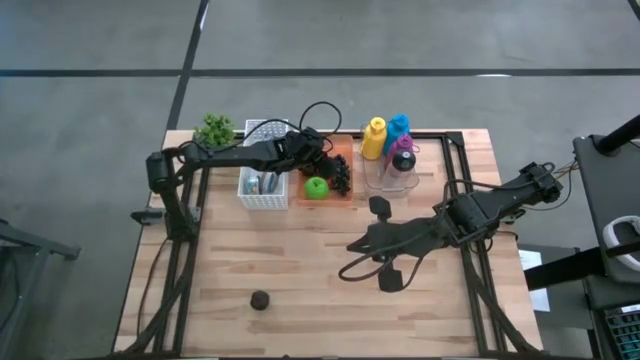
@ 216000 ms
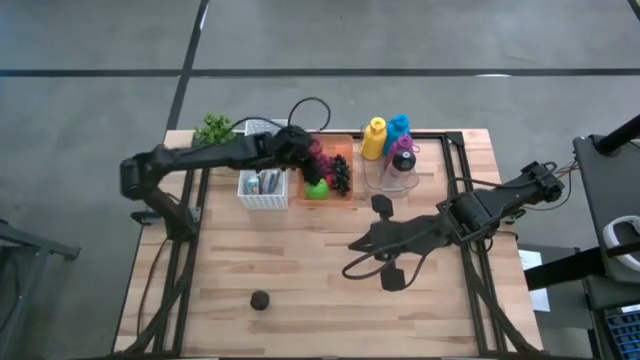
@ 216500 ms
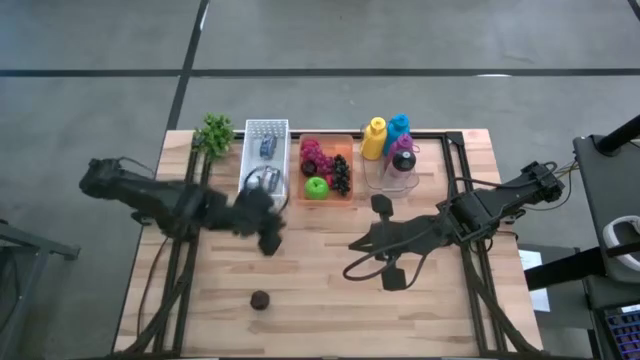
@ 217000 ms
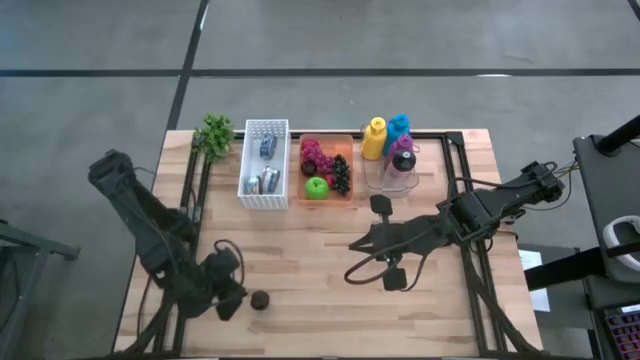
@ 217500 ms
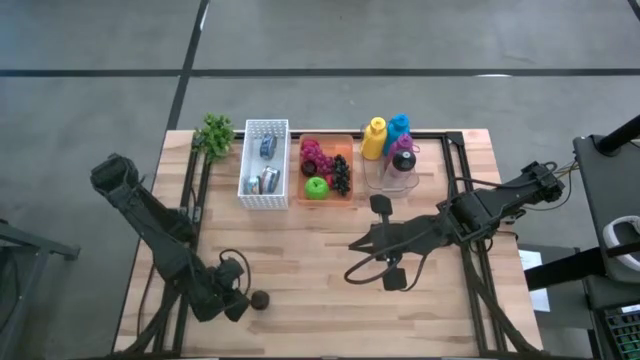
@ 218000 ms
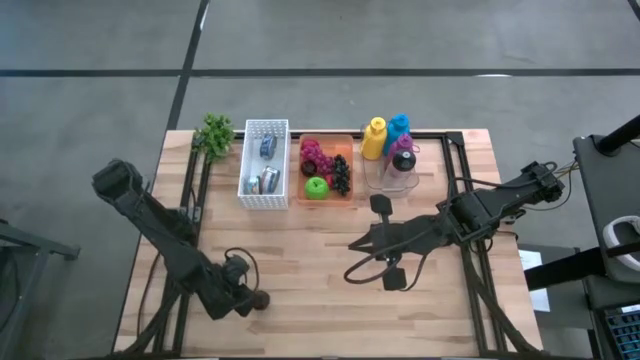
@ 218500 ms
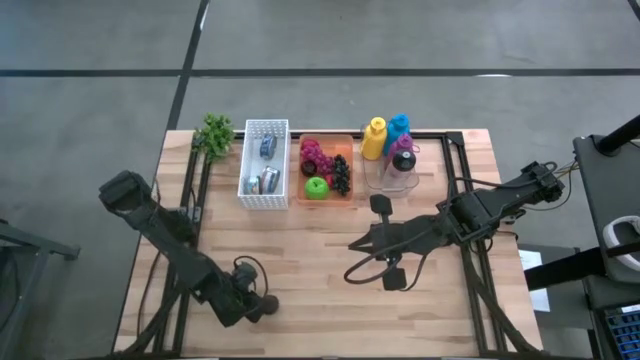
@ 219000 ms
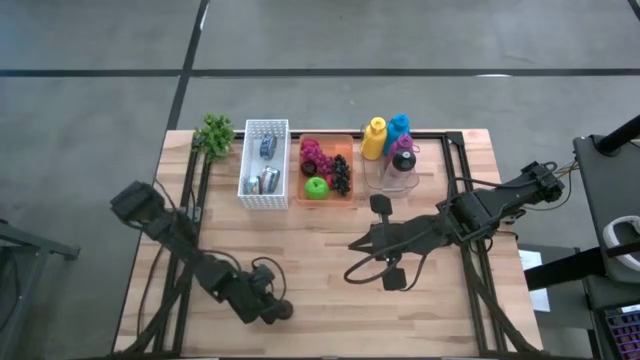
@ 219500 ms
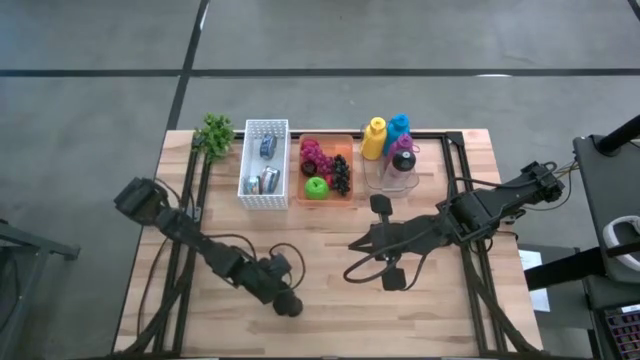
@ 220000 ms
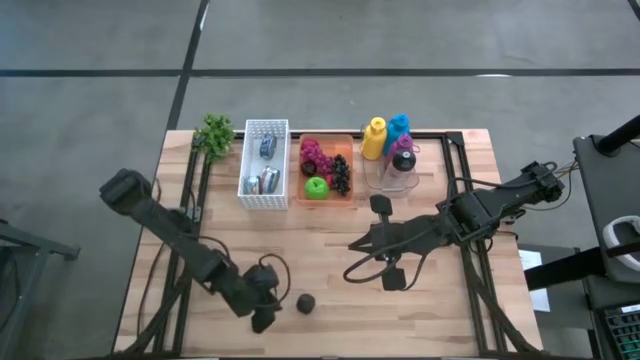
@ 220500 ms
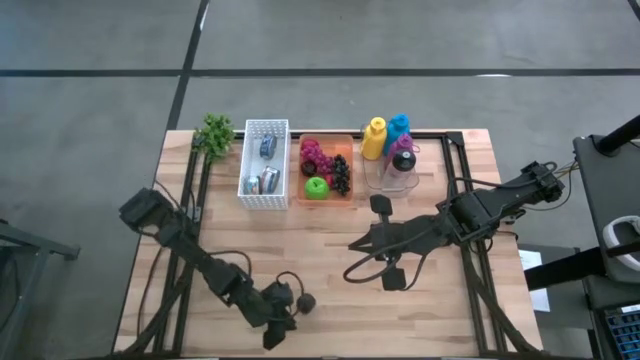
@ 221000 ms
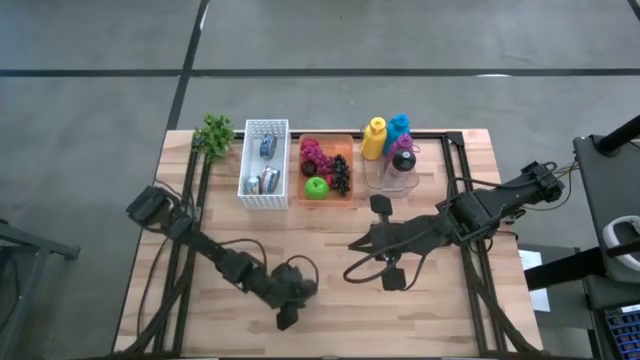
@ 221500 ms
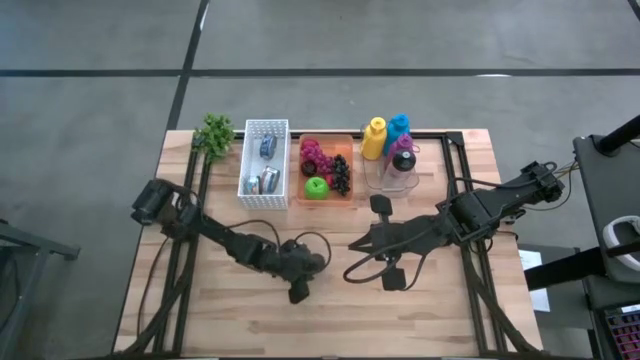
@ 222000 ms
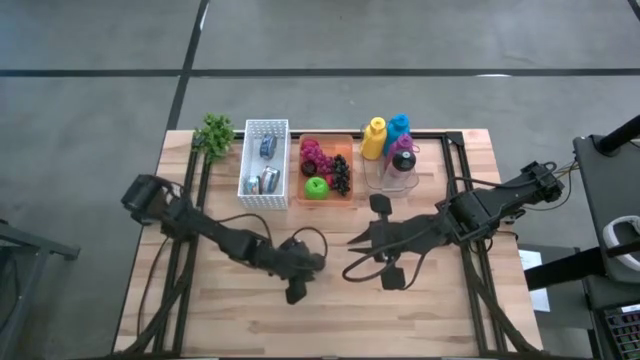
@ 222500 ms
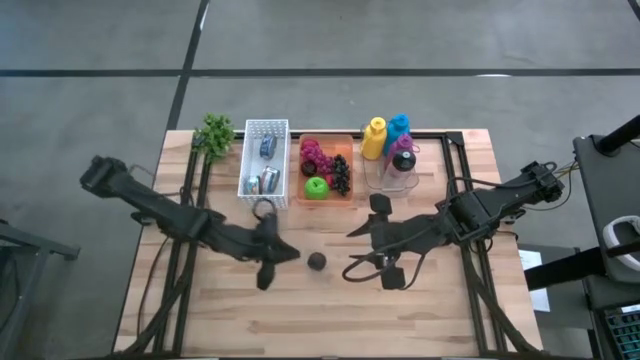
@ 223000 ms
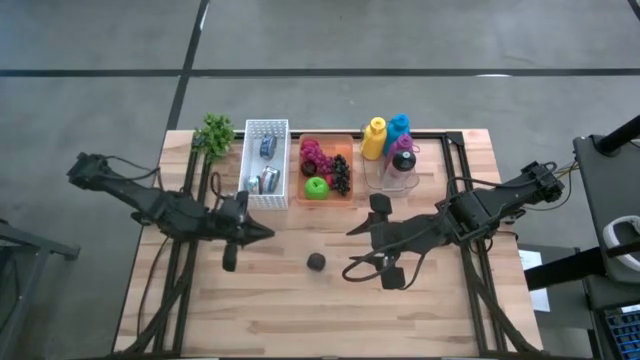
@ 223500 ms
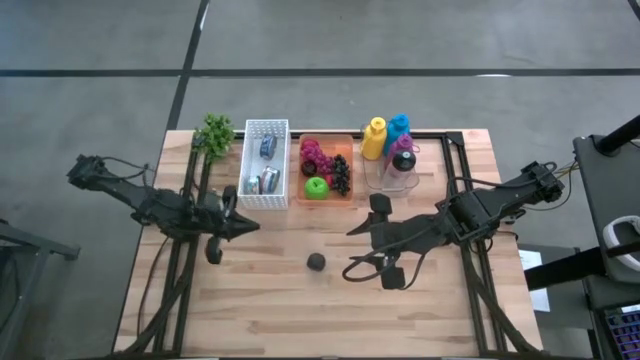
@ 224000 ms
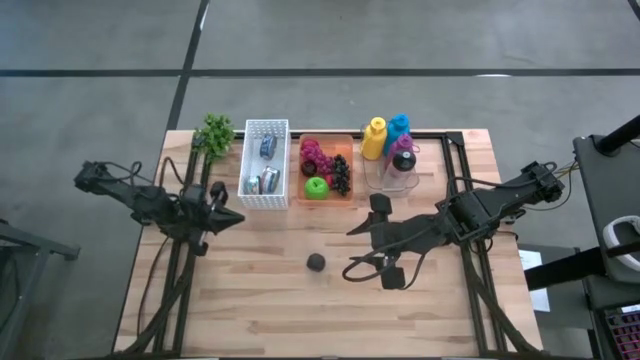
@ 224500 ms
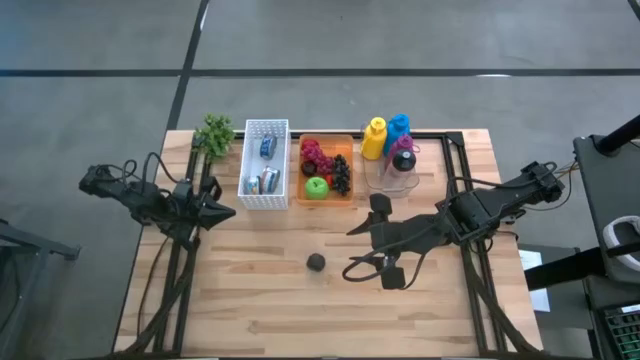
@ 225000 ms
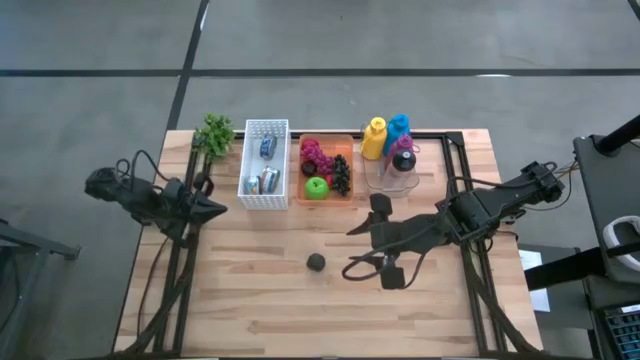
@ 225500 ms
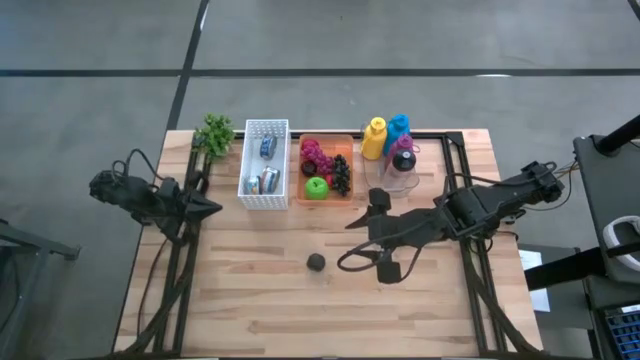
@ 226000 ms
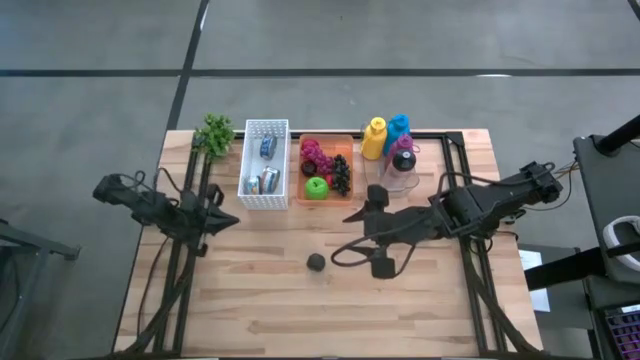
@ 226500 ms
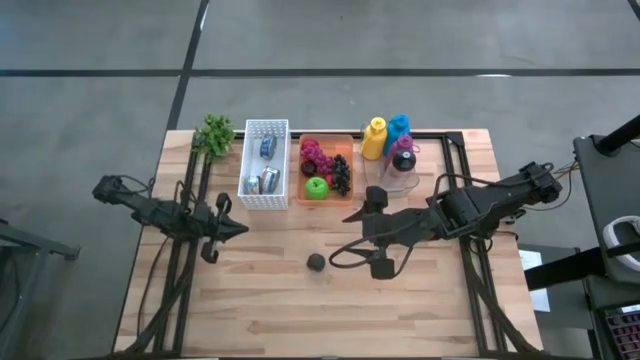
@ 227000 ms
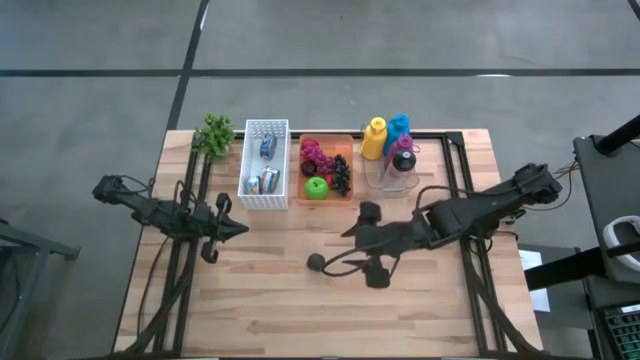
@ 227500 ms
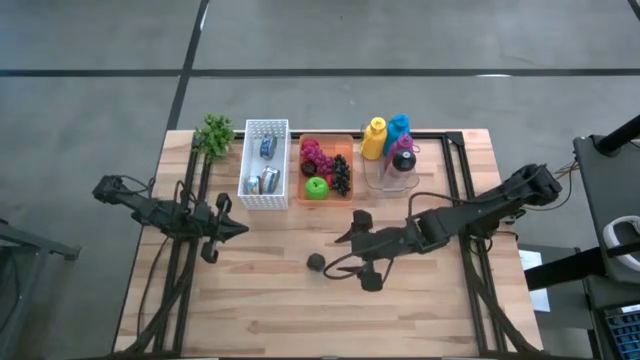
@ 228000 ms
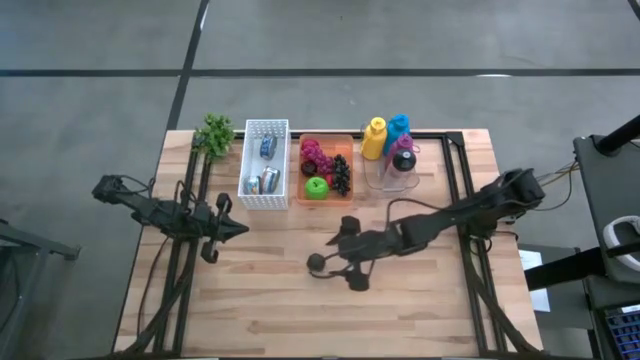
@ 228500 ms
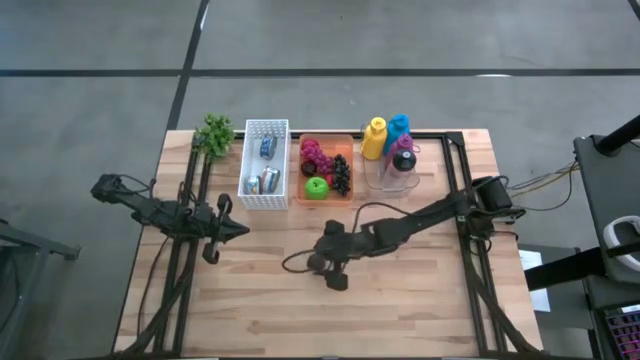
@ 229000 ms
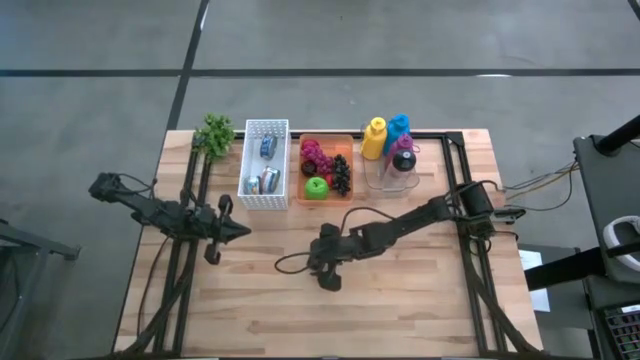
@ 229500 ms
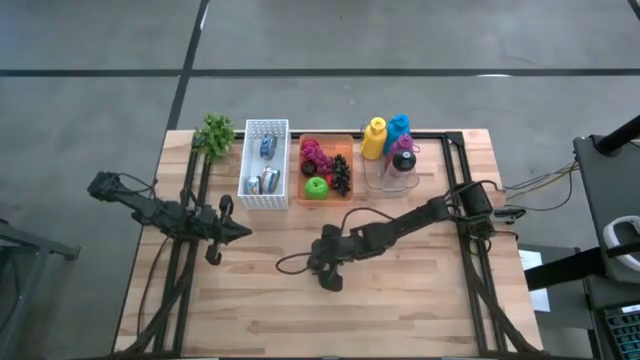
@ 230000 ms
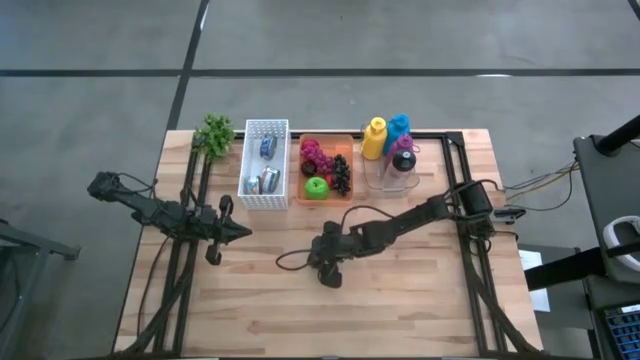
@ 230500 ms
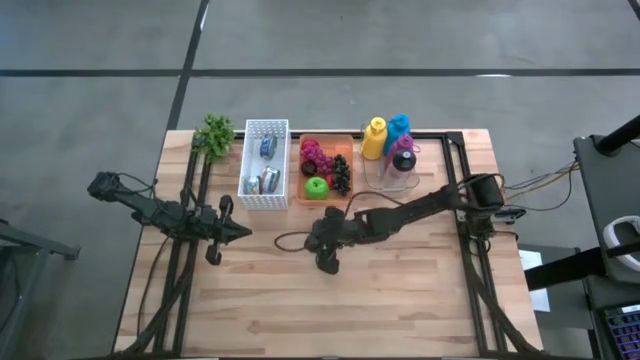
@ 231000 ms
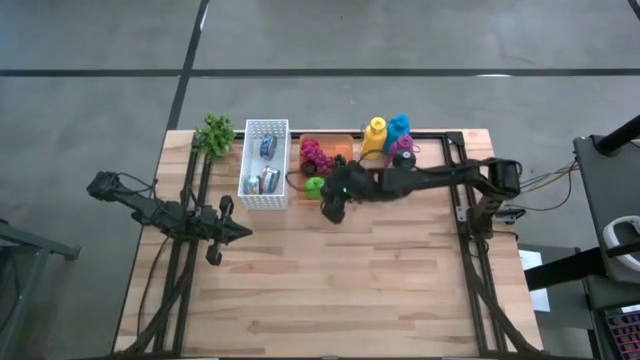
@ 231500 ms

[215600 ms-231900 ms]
Task: Pick & Place Food Item
Put the plum into the orange bin

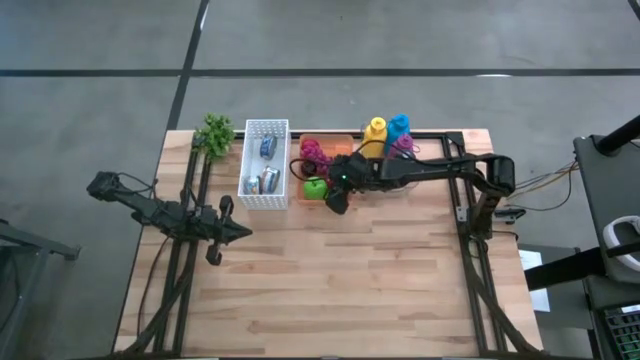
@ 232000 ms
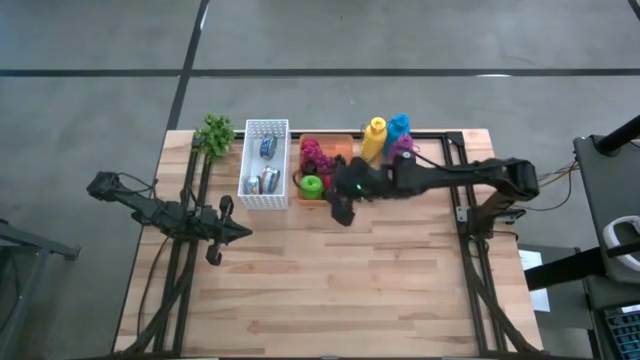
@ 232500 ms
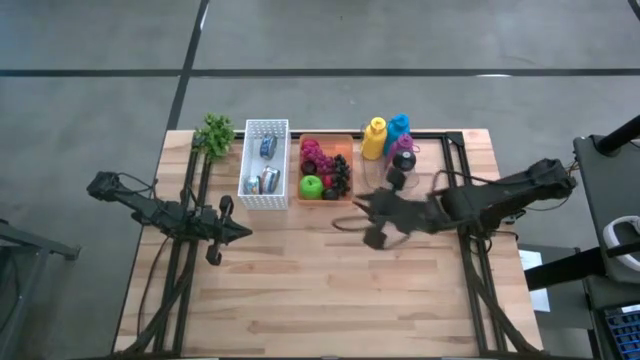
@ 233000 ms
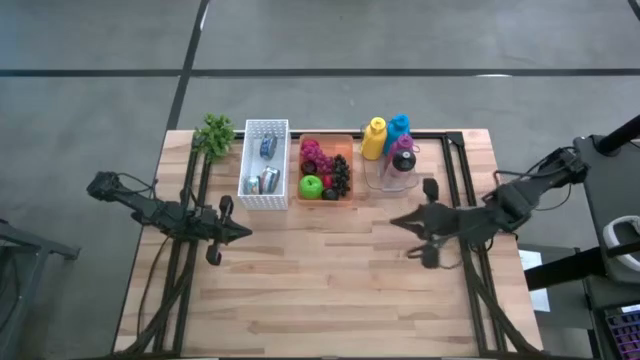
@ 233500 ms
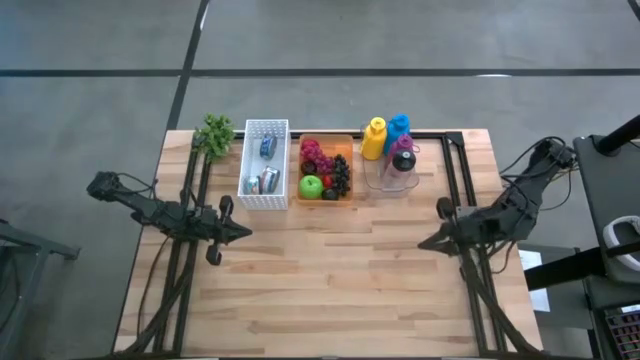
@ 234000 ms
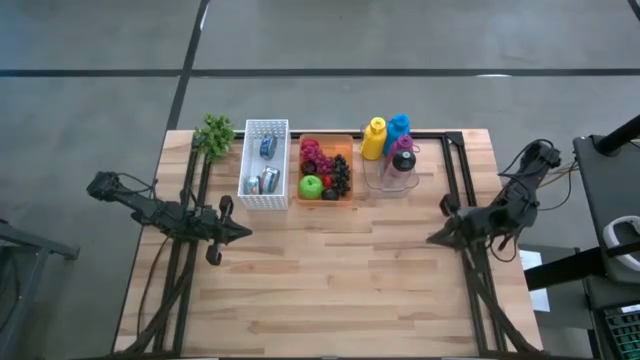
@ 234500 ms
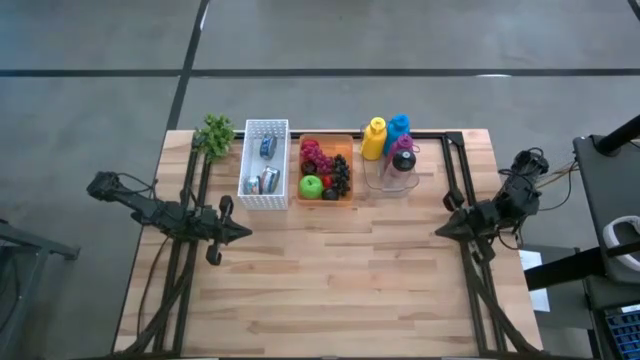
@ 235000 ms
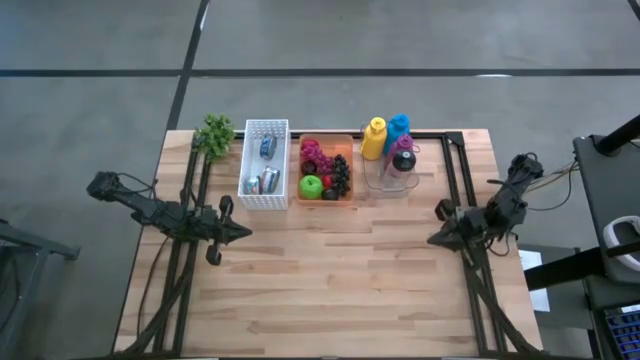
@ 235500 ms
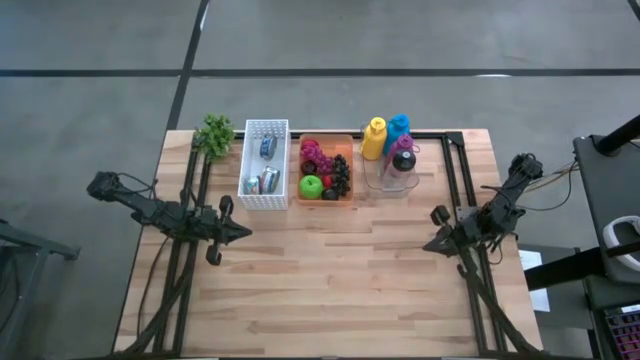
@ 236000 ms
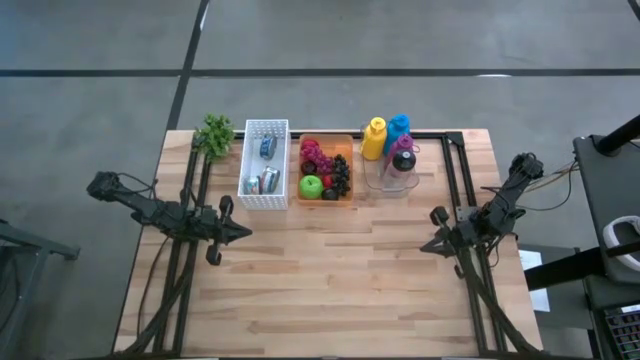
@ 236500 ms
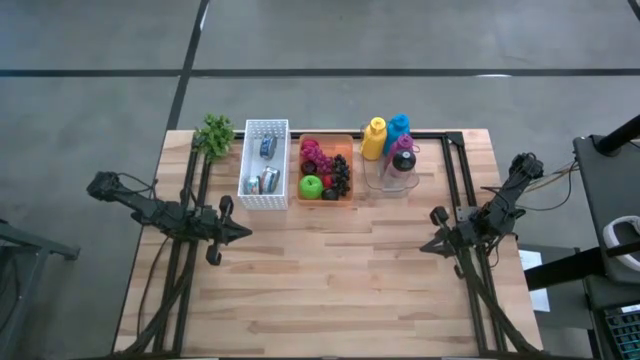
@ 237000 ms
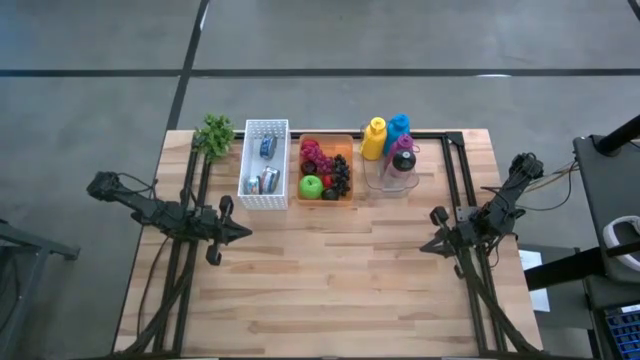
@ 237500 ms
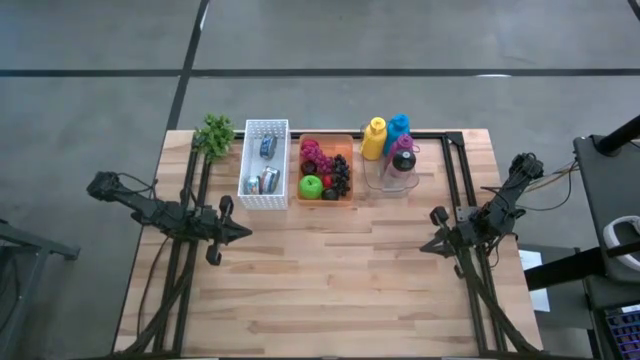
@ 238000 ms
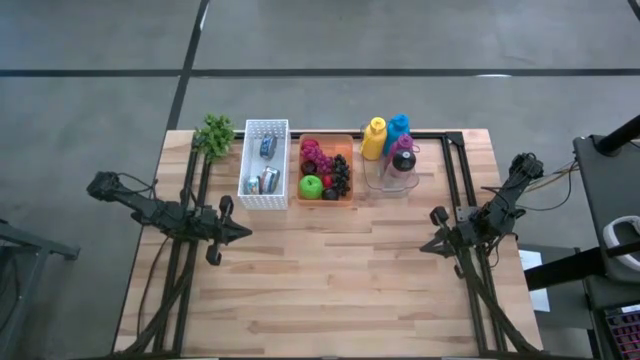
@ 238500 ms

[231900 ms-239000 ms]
Return to Home Position
